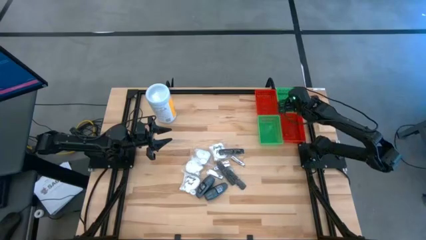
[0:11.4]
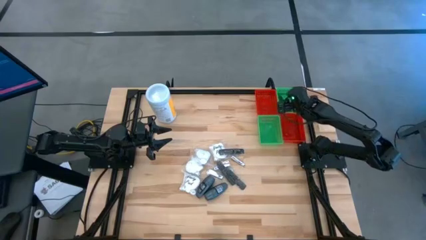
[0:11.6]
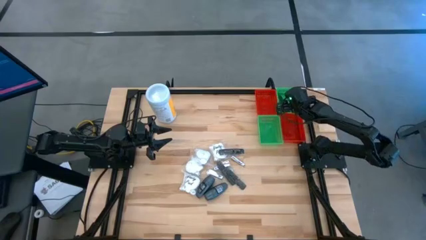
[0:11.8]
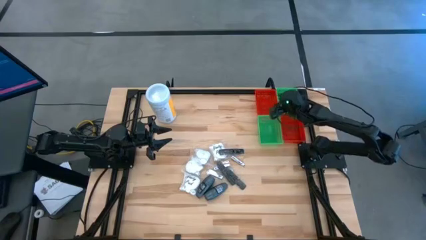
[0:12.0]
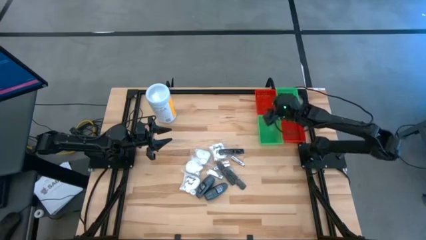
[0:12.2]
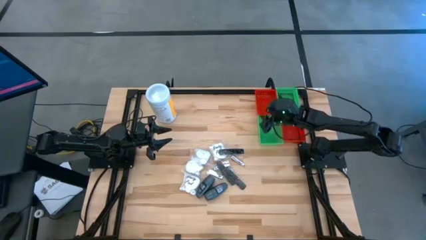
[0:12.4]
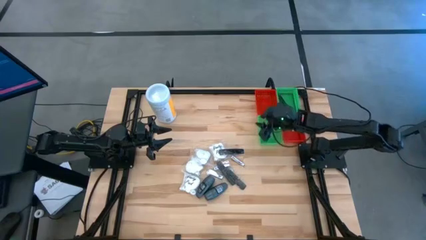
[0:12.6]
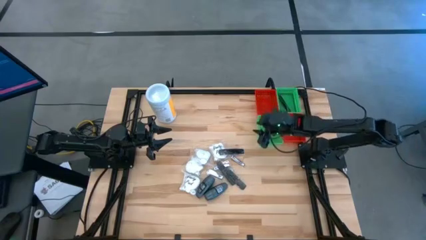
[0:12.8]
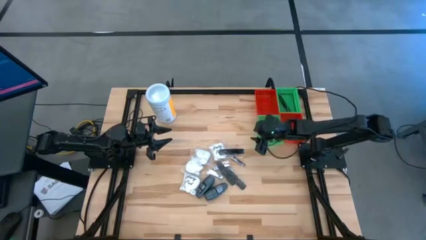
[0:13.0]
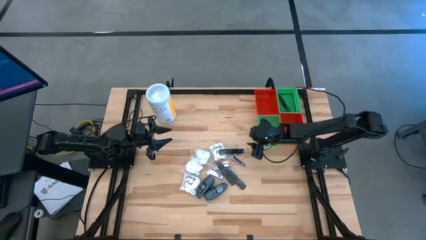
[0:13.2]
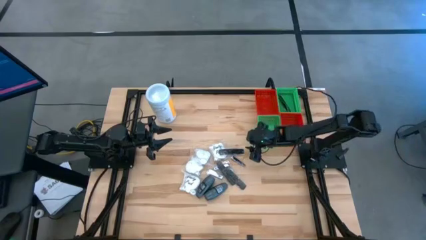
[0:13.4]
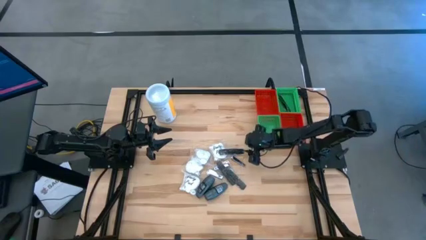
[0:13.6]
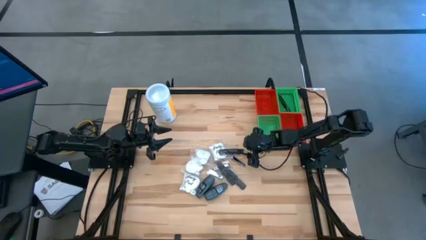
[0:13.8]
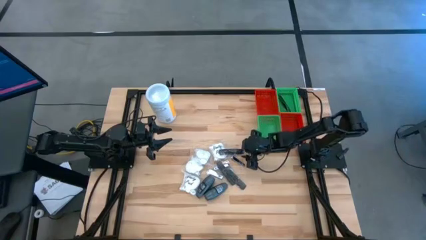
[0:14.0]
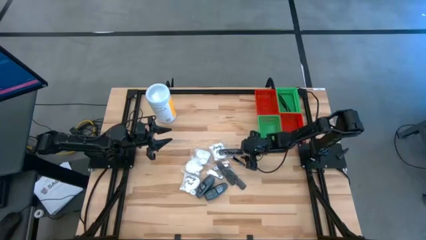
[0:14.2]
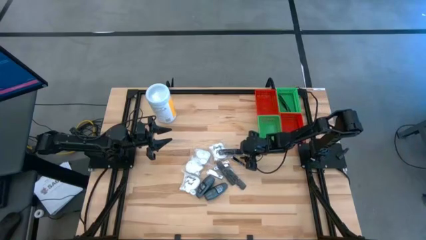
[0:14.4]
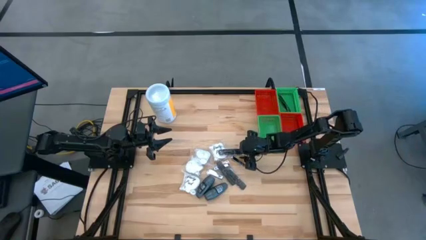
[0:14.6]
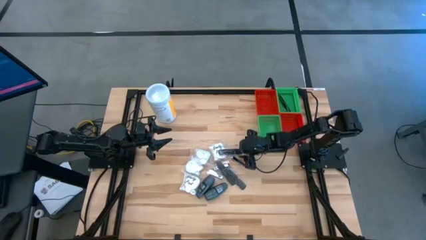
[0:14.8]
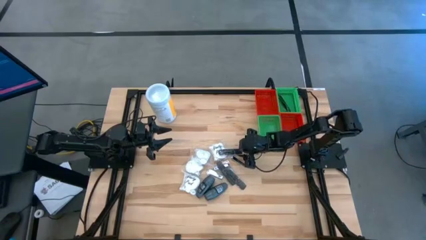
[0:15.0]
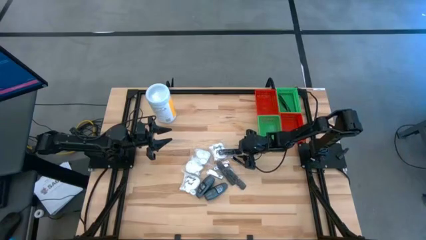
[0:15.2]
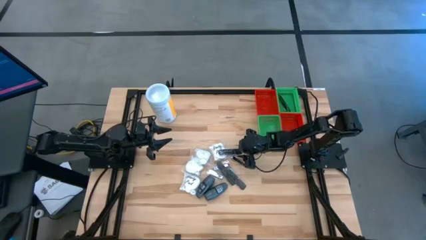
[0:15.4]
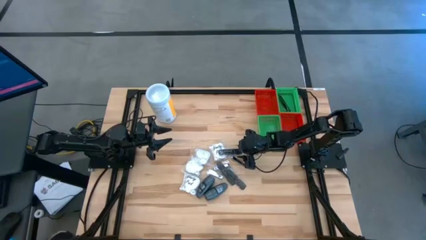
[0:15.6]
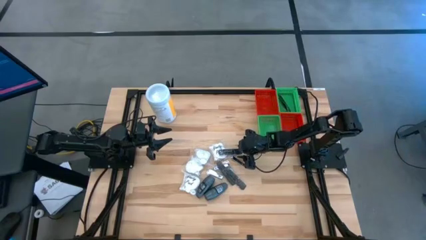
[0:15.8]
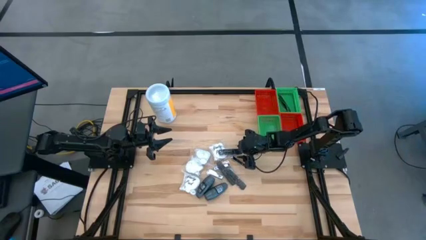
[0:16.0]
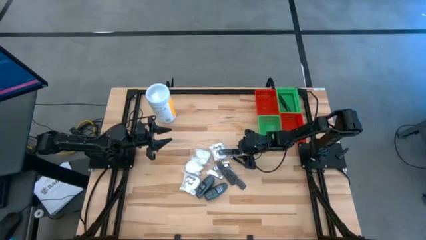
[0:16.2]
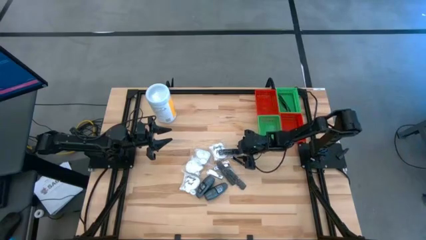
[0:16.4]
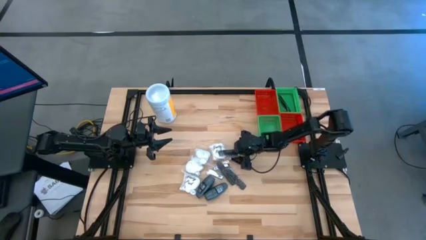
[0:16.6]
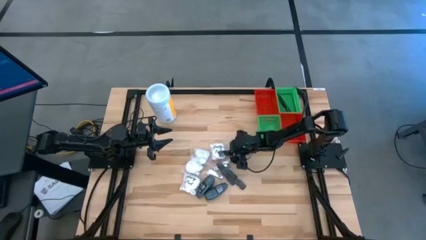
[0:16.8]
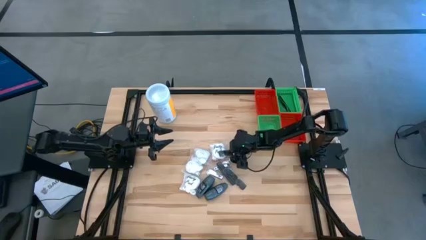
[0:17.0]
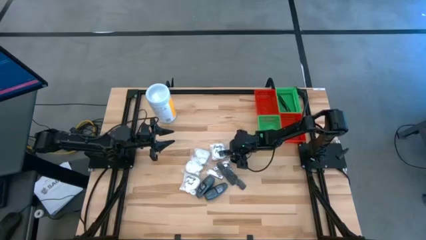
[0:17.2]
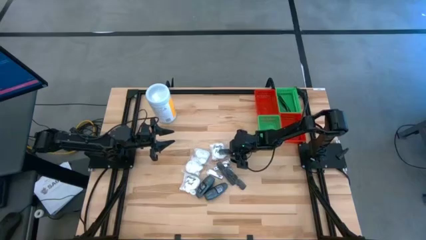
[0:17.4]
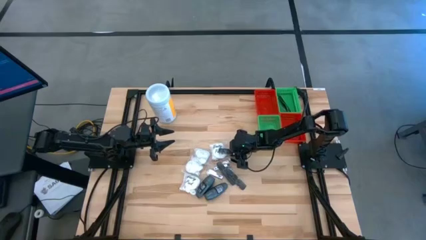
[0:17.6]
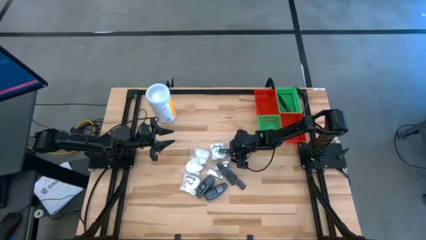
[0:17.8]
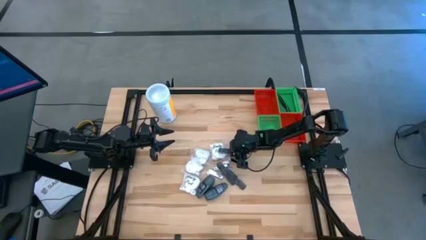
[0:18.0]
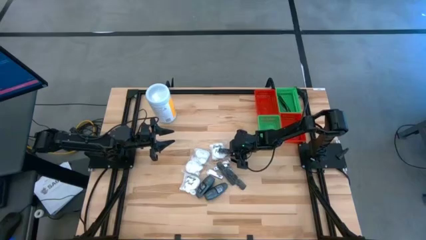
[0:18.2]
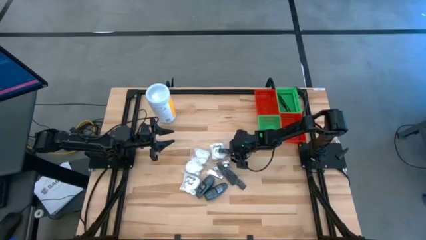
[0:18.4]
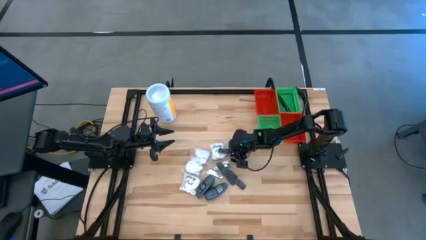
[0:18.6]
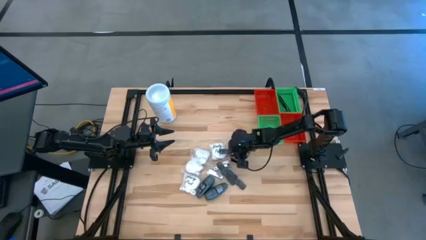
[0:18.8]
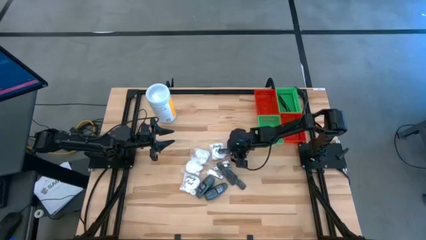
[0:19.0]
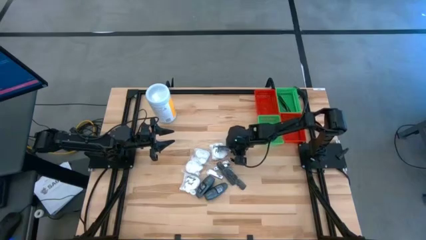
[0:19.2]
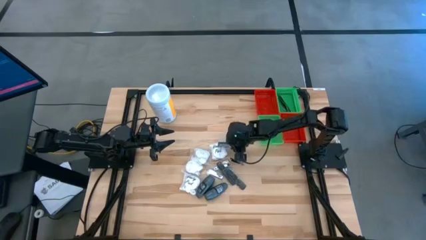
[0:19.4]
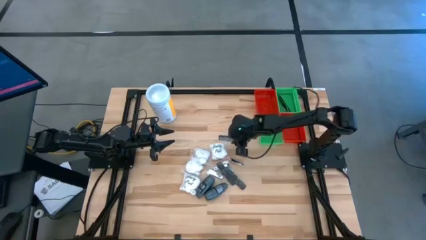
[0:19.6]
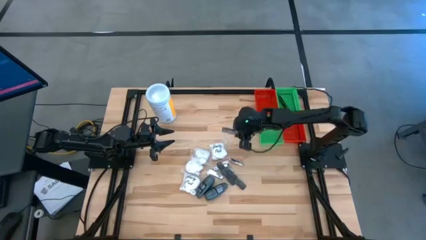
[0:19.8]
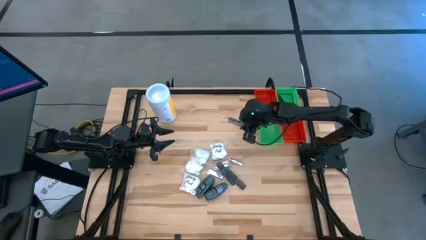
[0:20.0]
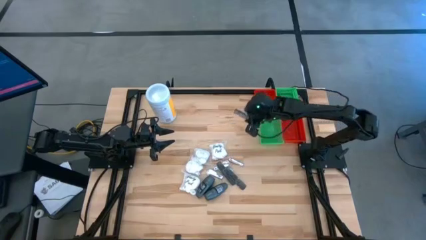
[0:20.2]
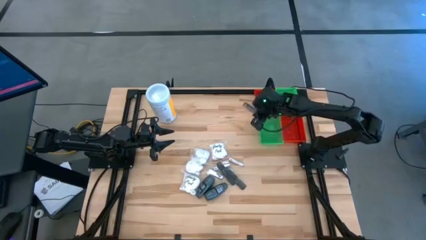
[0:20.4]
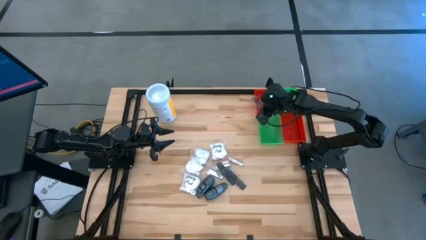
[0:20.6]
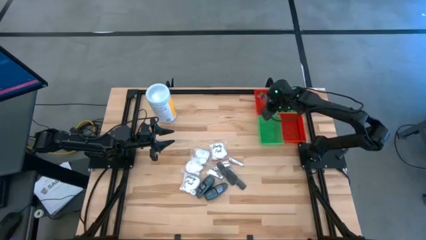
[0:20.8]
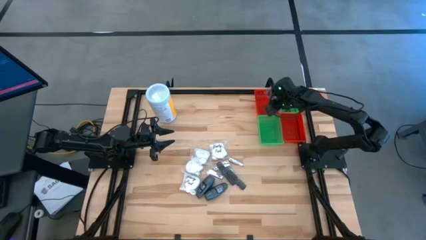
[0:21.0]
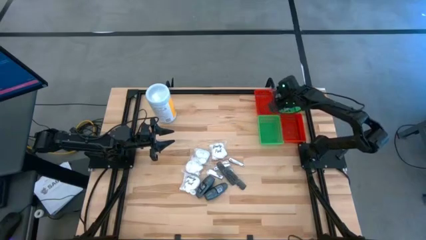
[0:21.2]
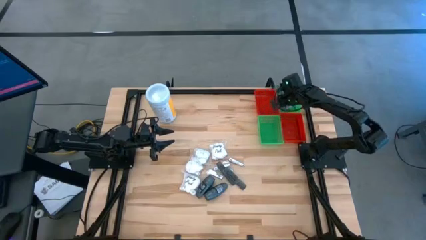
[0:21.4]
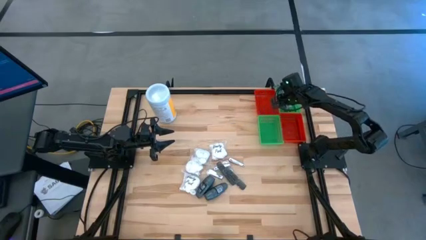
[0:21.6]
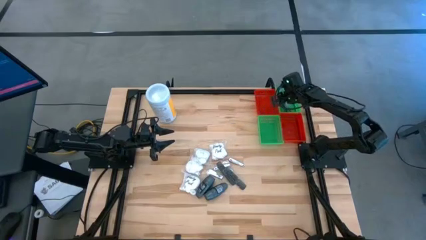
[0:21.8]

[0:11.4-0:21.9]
Task: Pick & Place Travel size toiletries
Put the black comb into the top green bin
